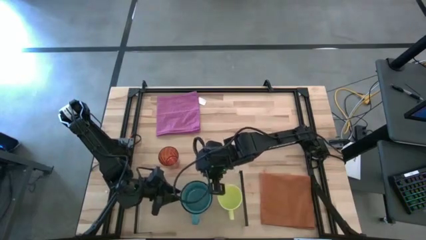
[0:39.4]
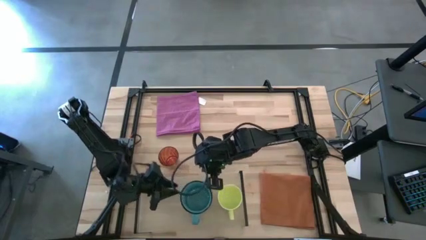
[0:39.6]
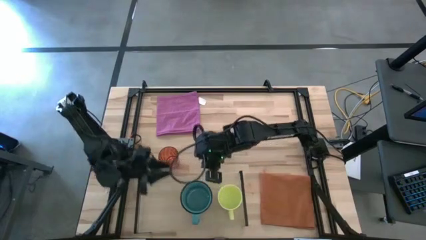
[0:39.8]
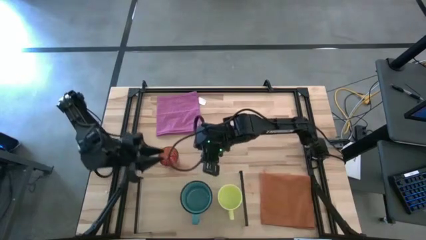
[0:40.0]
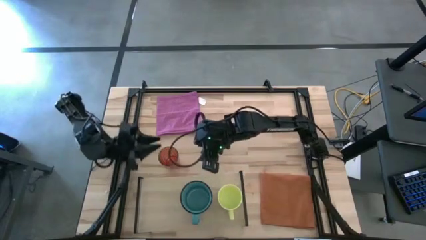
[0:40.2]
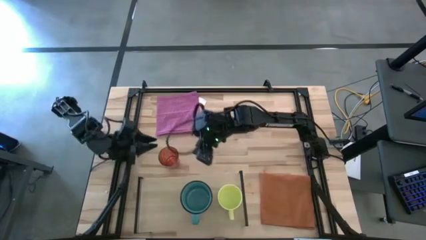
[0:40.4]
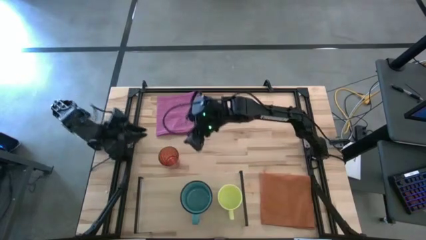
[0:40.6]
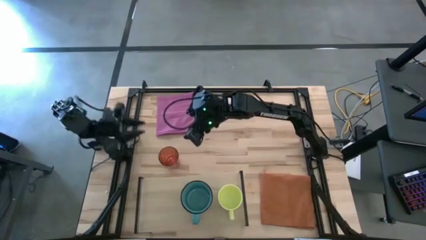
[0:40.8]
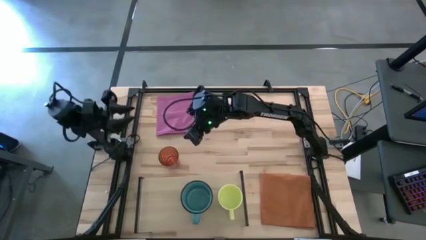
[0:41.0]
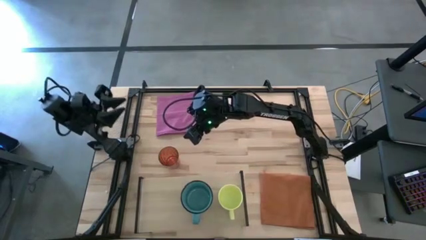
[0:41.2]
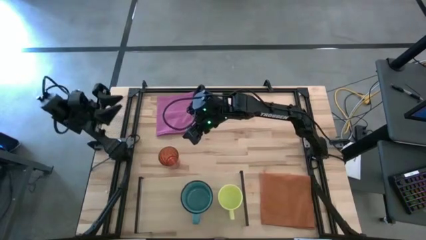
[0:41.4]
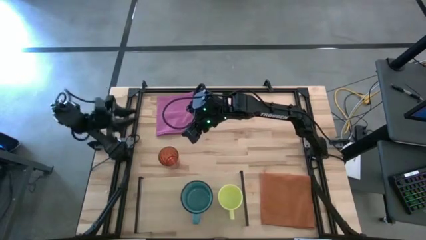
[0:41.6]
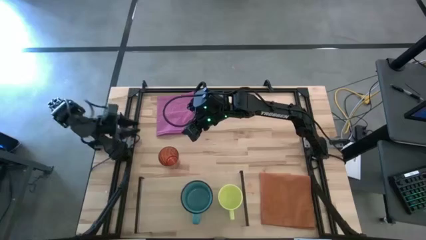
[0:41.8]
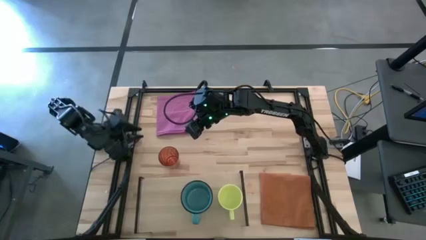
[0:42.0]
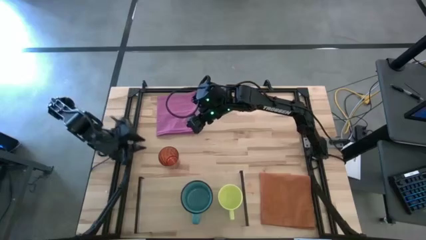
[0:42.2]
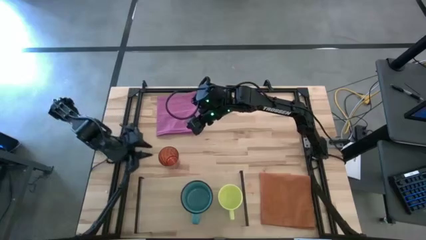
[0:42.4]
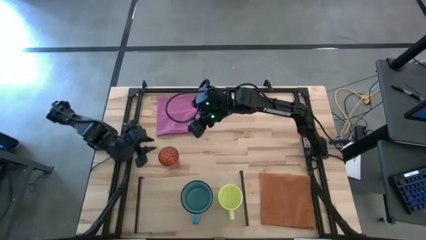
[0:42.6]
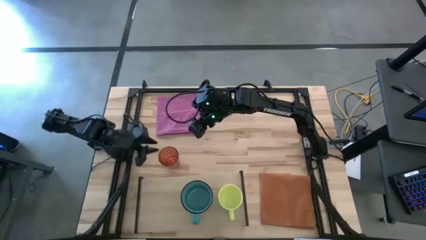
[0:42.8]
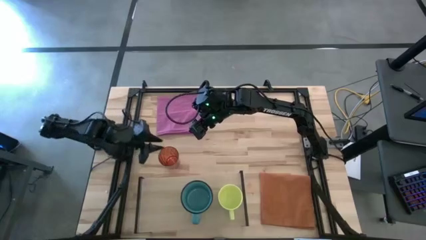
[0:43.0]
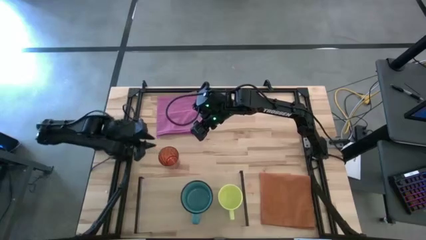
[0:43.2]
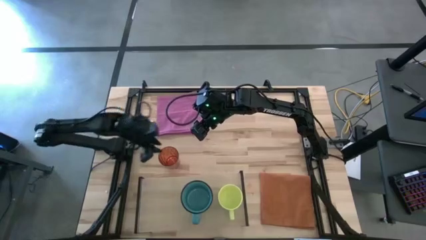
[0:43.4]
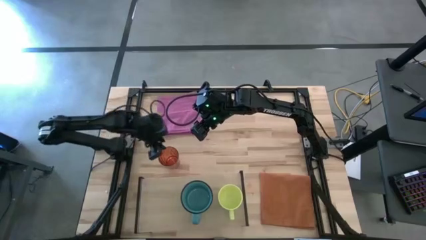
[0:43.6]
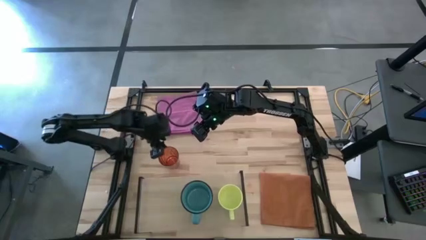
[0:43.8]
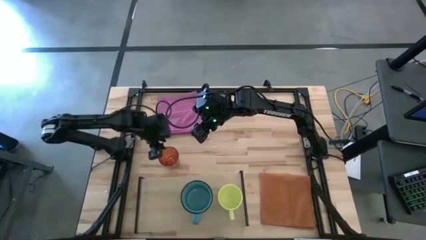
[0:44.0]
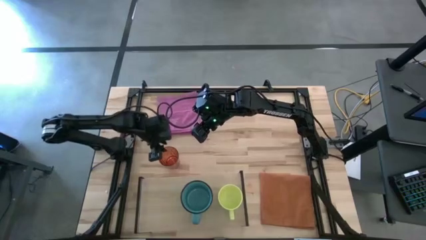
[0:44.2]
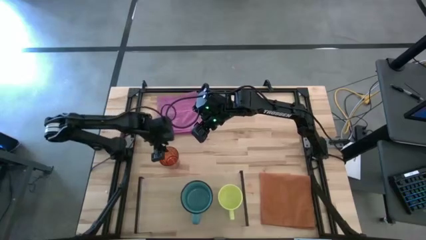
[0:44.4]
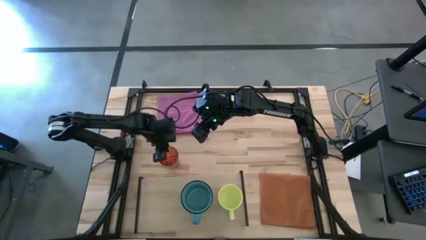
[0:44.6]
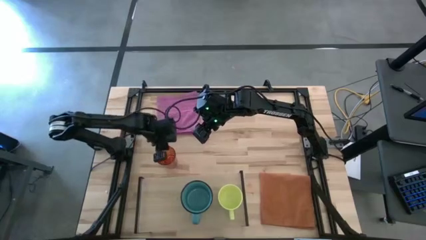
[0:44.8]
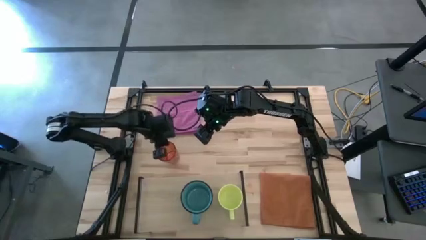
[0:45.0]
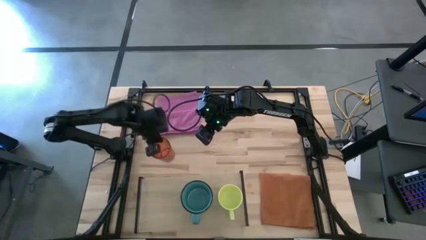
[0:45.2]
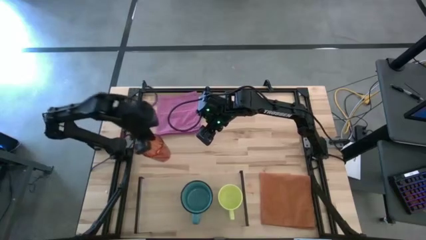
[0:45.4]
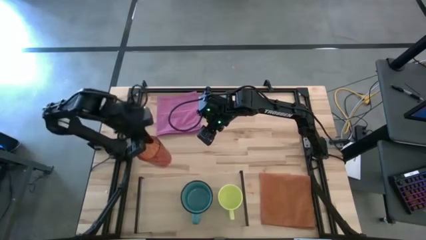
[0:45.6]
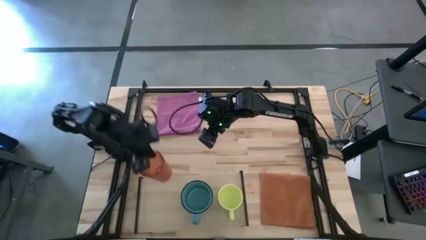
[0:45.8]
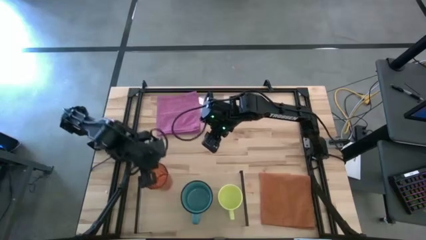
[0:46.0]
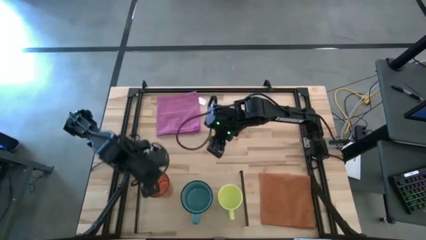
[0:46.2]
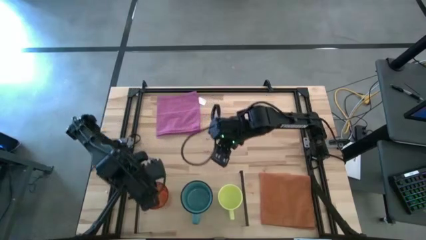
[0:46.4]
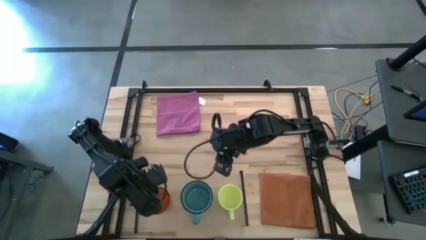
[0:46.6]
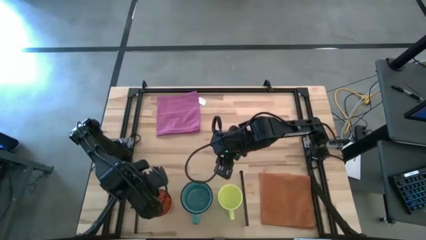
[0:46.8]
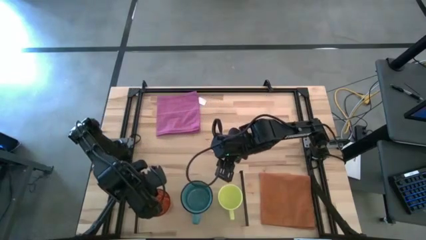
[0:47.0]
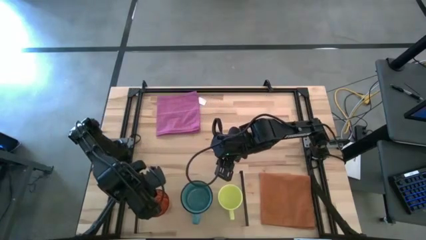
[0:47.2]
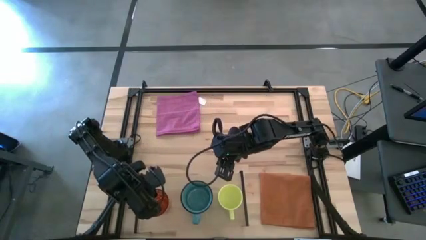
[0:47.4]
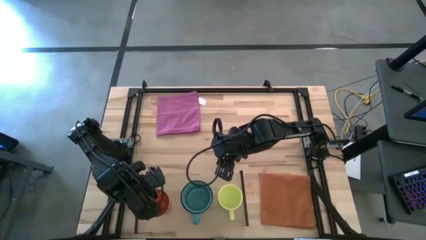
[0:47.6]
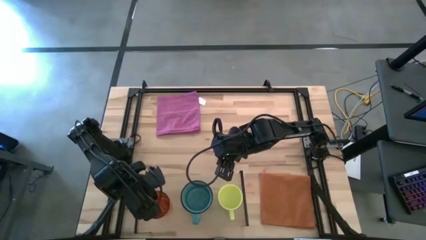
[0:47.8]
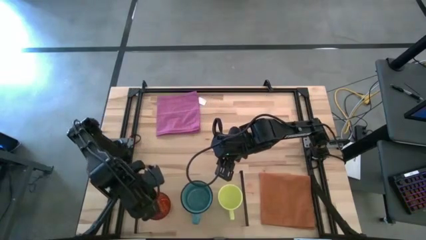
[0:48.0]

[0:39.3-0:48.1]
Task: Stack small to large cups/mugs on shelf
Put the brown cup on the shelf

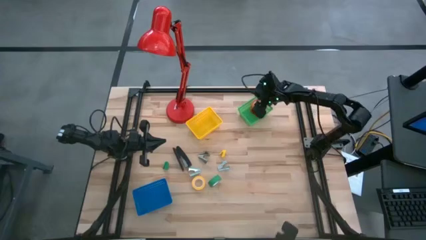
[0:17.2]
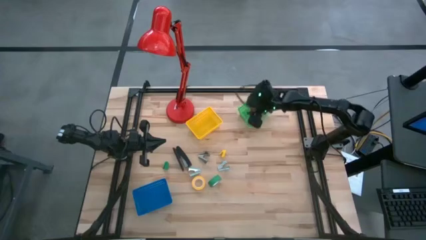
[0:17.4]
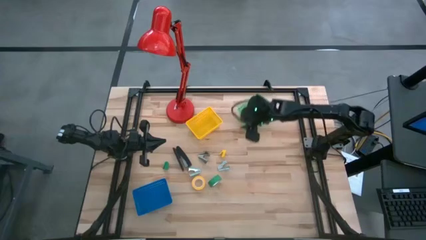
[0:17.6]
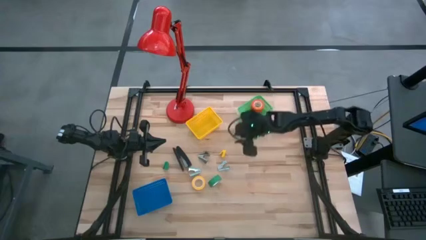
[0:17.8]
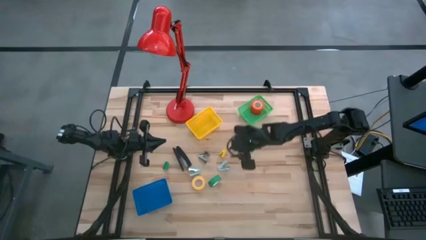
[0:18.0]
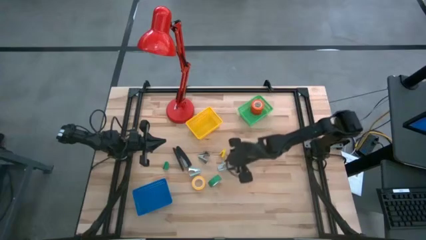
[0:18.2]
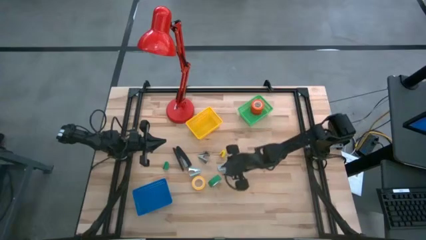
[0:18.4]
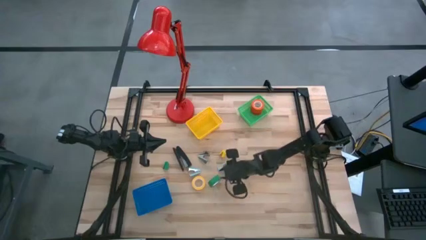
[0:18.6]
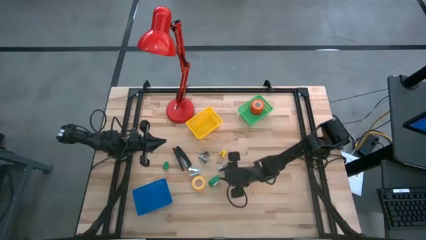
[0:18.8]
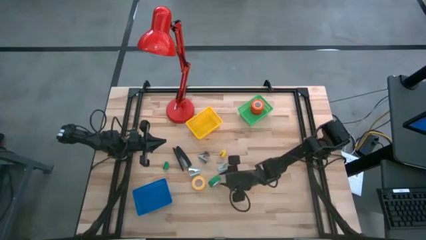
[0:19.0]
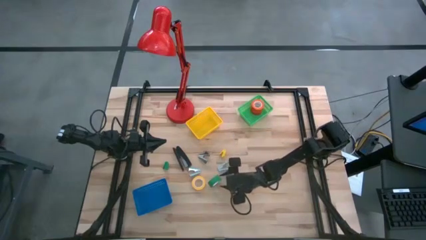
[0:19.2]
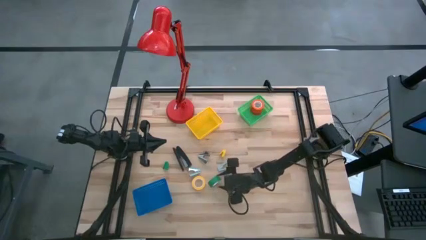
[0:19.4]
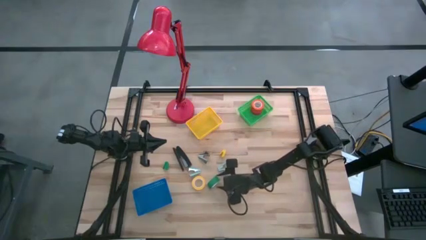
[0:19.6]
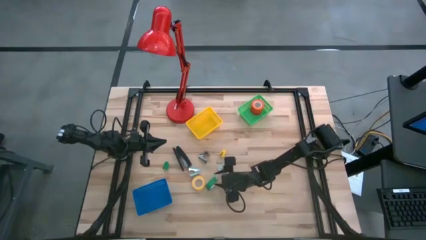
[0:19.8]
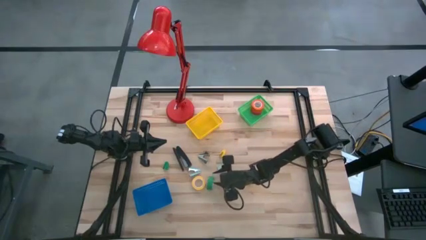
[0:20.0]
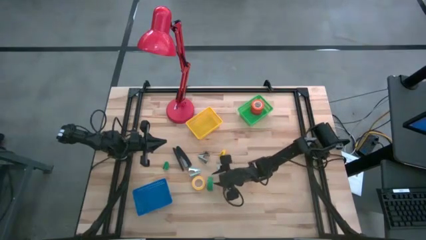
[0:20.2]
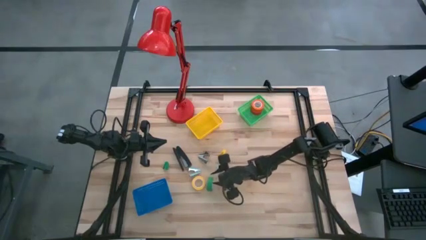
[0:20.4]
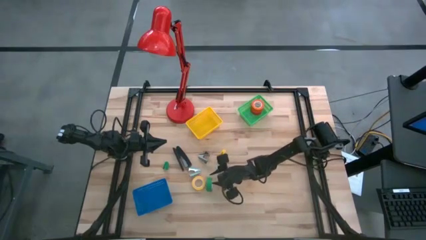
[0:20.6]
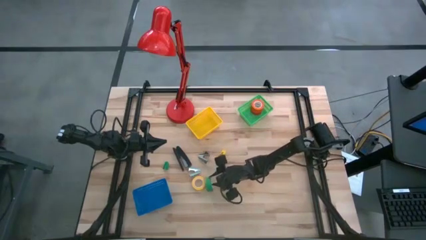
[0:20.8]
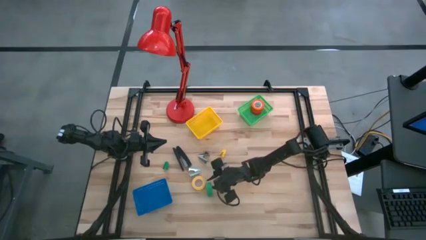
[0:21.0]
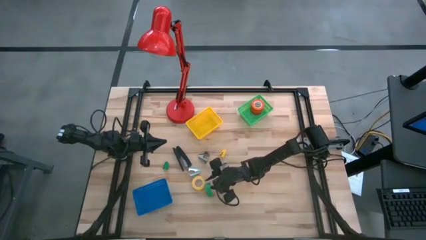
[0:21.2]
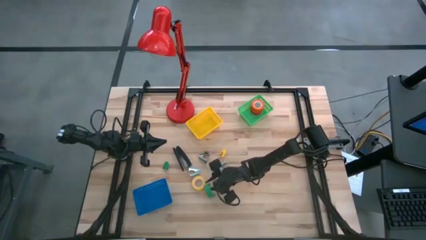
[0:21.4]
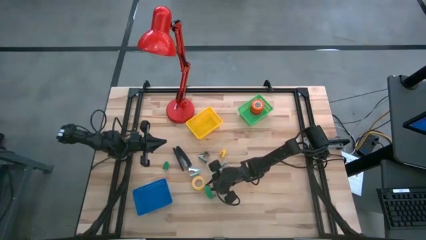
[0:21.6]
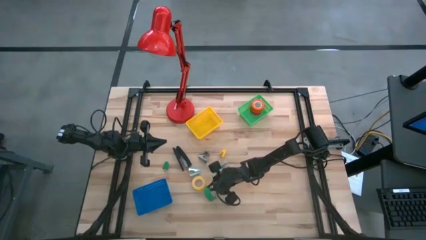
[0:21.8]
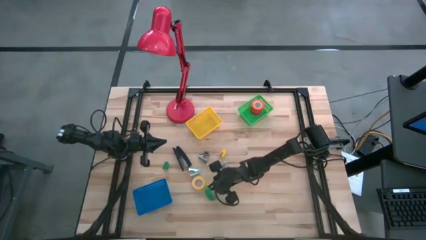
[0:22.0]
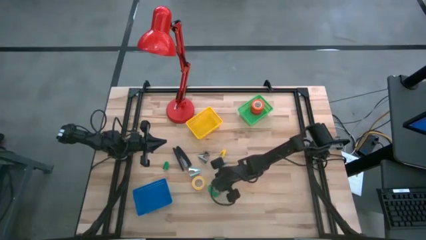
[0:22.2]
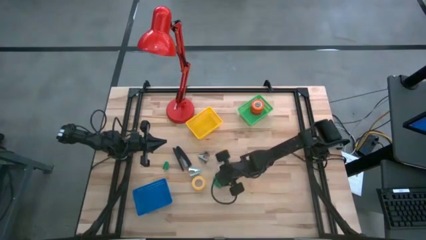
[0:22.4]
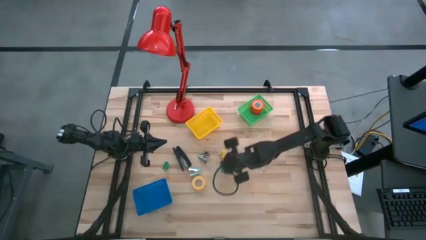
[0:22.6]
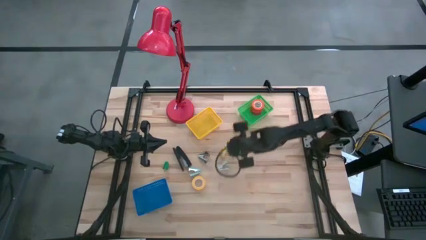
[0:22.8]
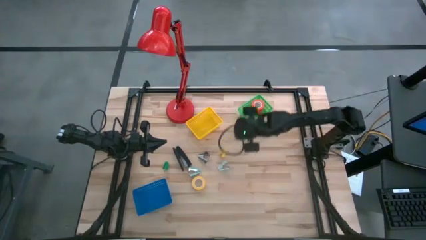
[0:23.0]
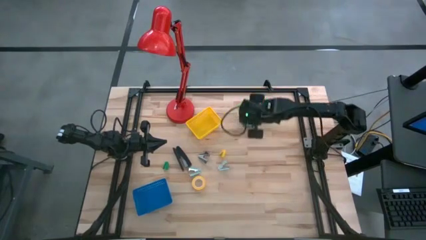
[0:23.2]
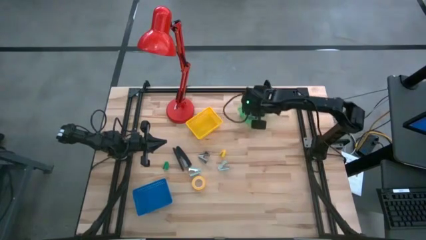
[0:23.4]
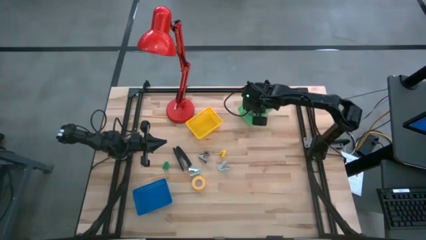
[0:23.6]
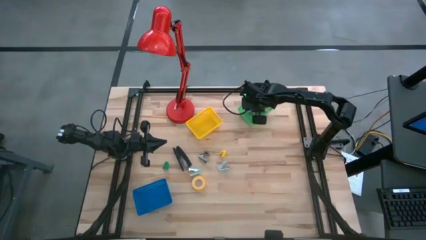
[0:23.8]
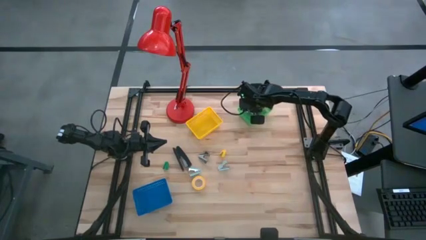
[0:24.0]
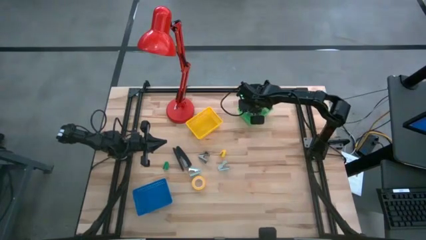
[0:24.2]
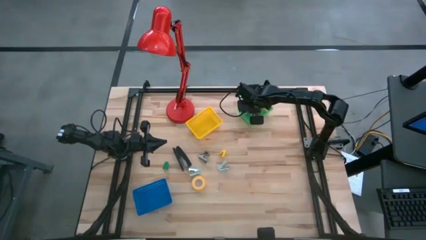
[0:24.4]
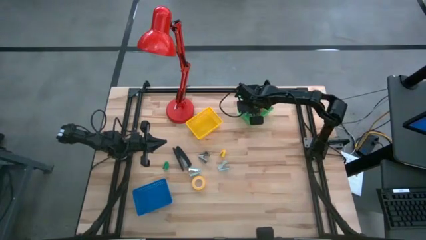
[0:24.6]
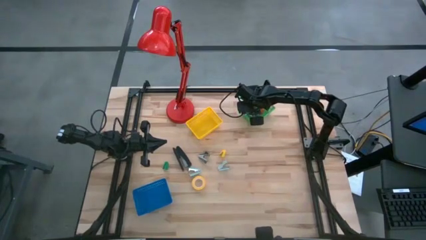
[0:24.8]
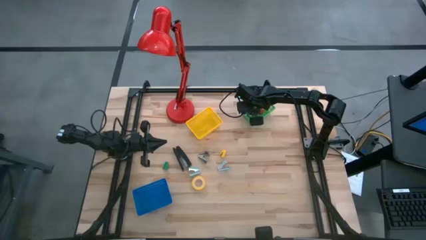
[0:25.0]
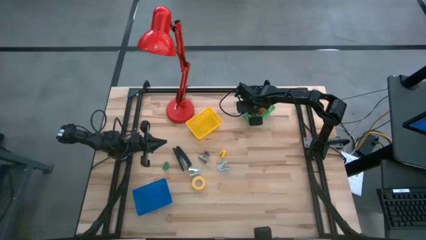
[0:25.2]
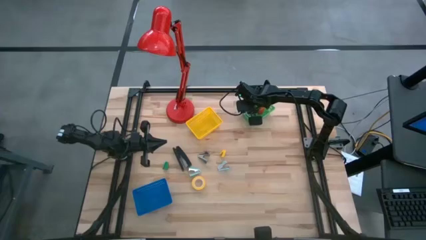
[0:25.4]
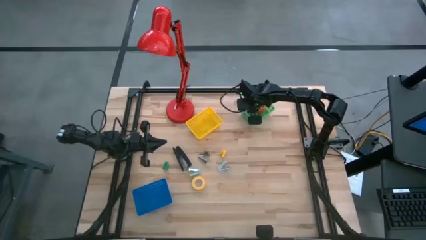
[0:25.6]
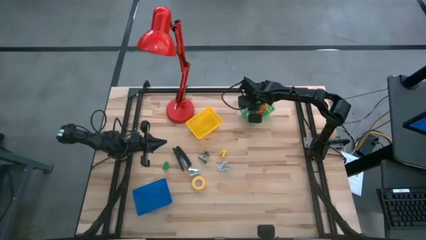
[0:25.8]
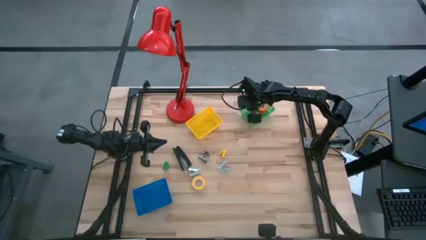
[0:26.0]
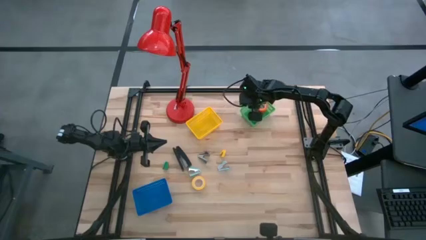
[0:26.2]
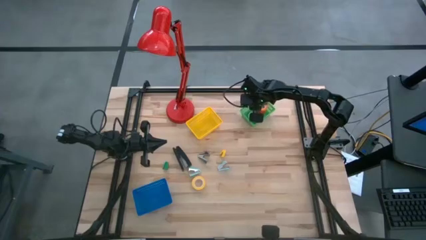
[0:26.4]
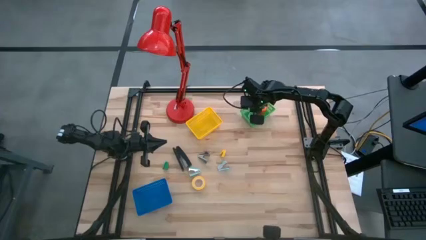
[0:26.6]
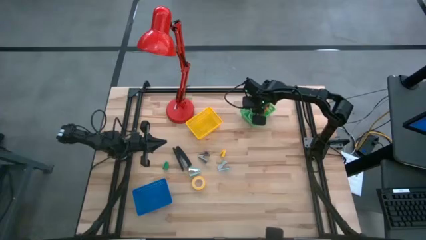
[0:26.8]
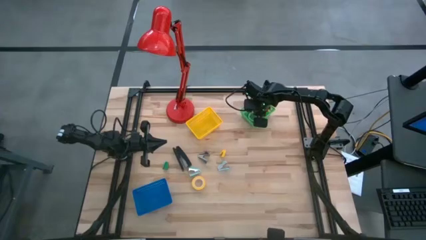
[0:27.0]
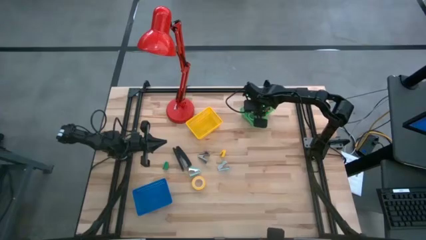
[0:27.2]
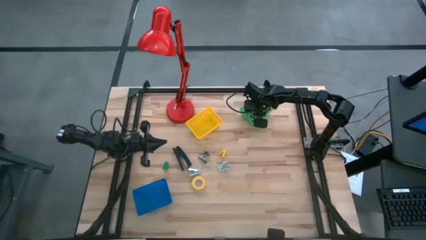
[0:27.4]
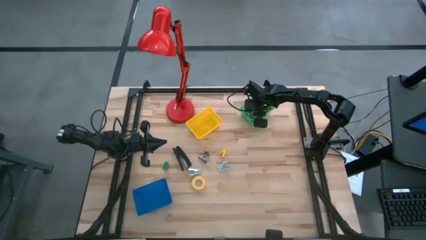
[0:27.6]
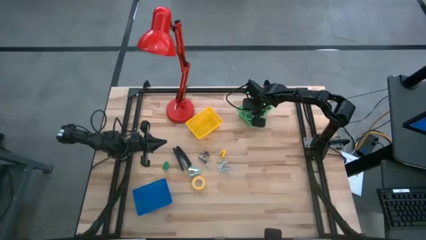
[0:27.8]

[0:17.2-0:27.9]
Task: Pick and place Stapler, Stapler remover, tape
Put the green tape into the green bin
